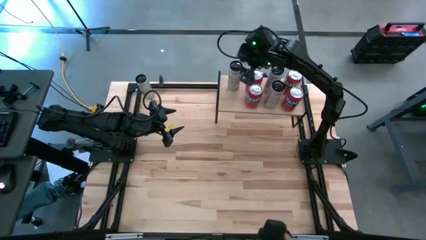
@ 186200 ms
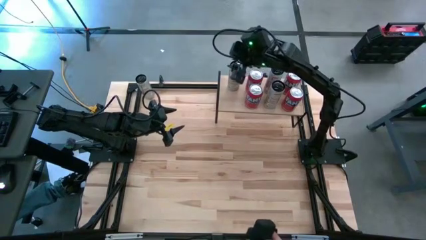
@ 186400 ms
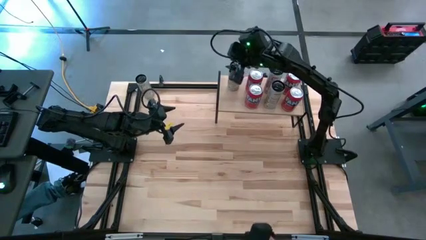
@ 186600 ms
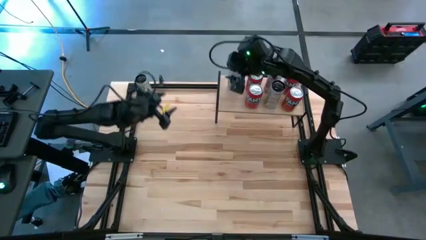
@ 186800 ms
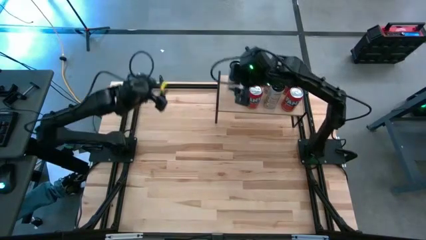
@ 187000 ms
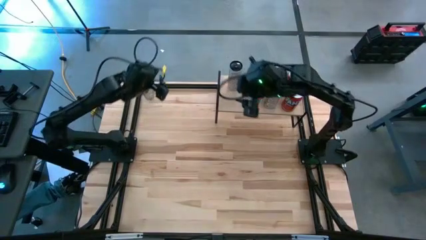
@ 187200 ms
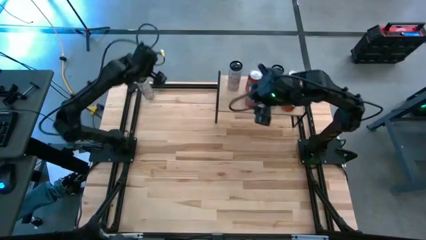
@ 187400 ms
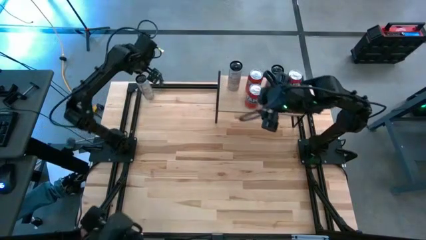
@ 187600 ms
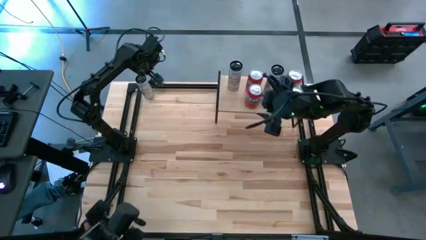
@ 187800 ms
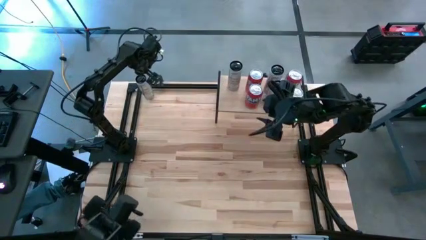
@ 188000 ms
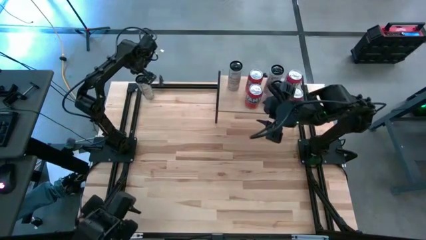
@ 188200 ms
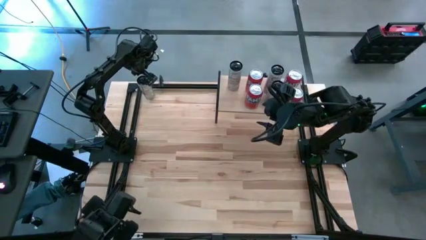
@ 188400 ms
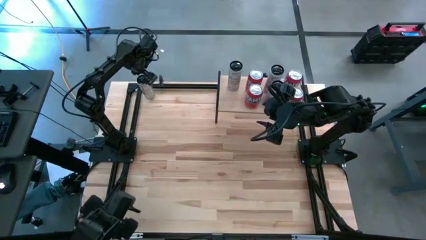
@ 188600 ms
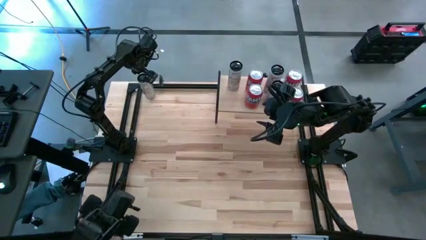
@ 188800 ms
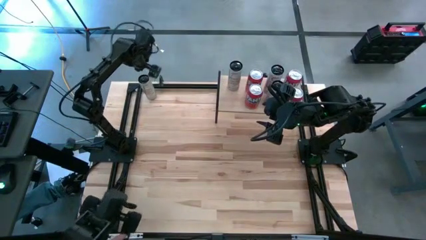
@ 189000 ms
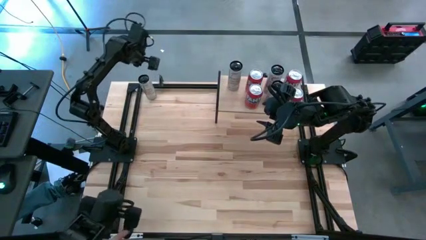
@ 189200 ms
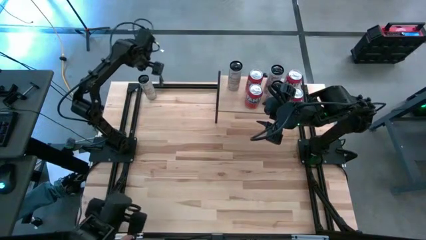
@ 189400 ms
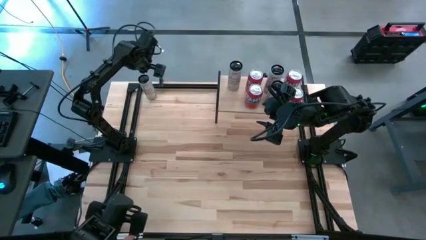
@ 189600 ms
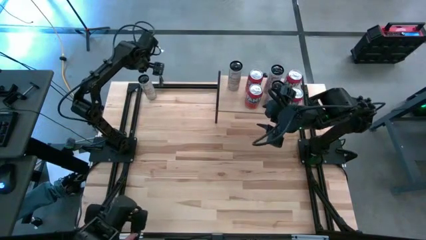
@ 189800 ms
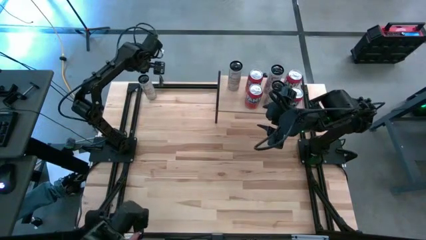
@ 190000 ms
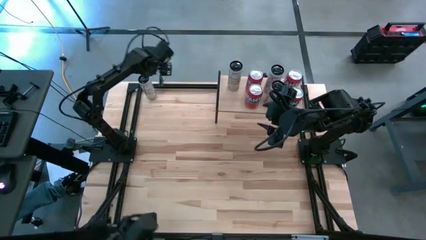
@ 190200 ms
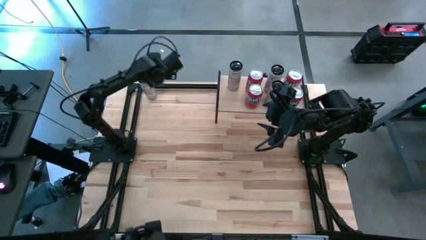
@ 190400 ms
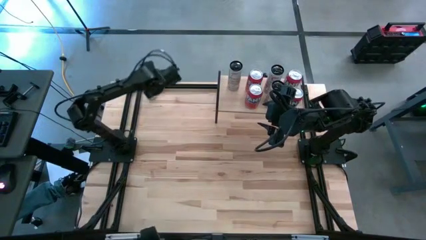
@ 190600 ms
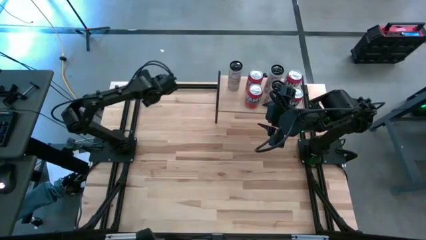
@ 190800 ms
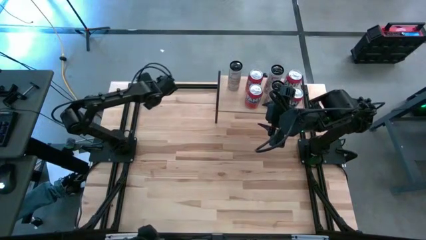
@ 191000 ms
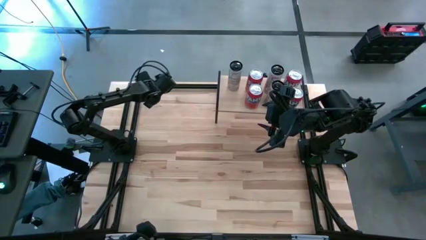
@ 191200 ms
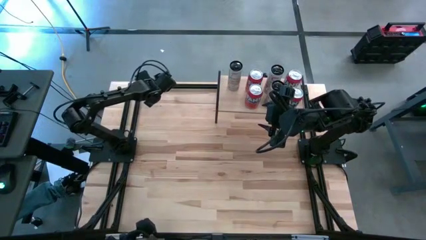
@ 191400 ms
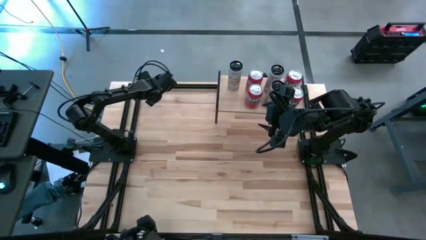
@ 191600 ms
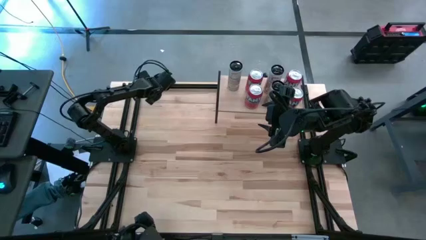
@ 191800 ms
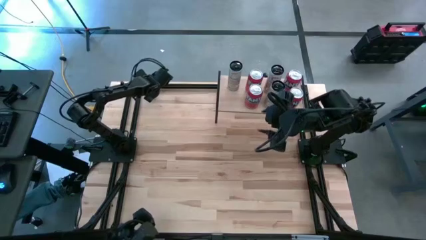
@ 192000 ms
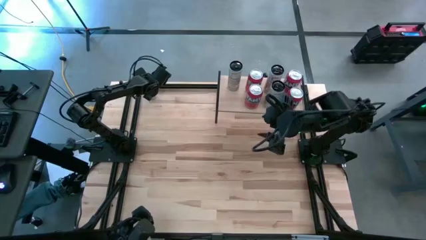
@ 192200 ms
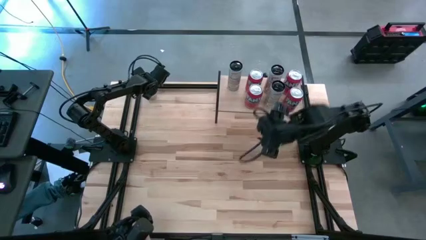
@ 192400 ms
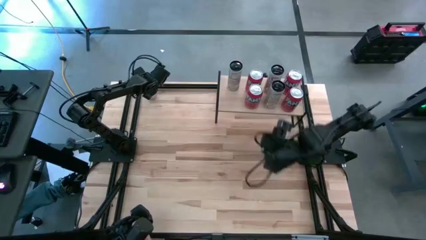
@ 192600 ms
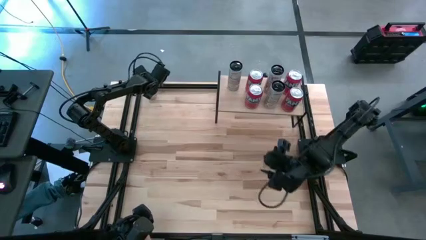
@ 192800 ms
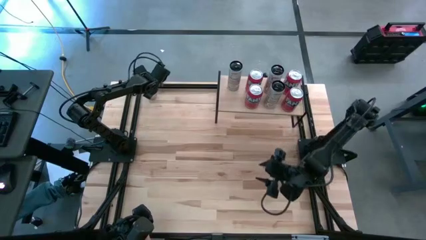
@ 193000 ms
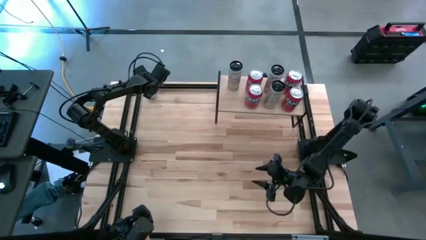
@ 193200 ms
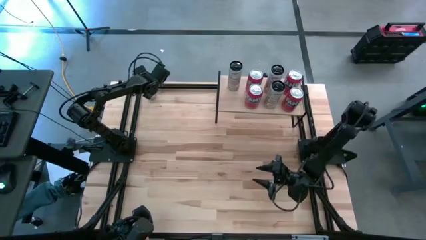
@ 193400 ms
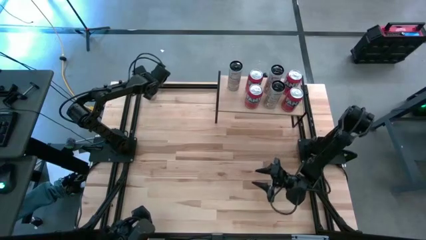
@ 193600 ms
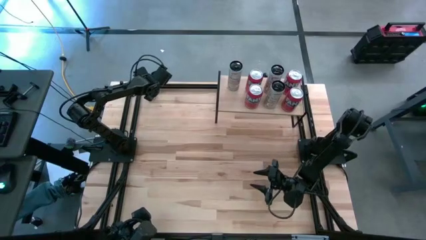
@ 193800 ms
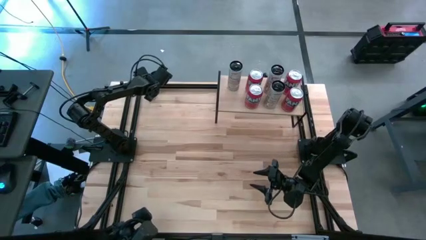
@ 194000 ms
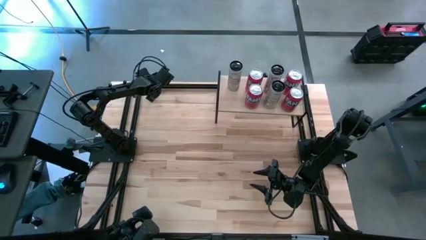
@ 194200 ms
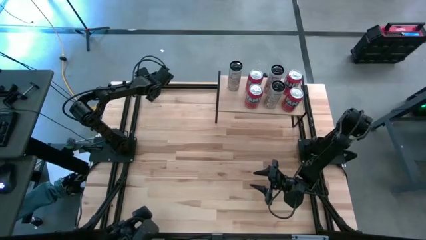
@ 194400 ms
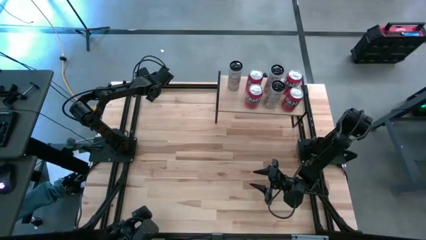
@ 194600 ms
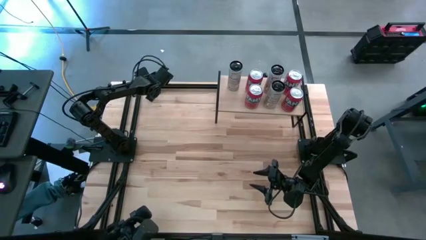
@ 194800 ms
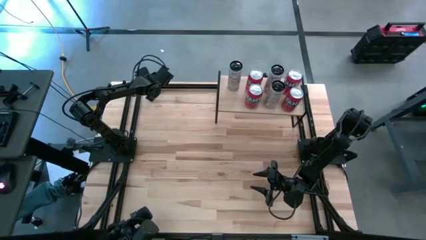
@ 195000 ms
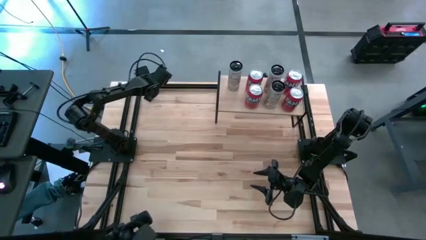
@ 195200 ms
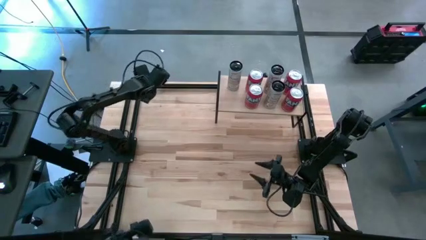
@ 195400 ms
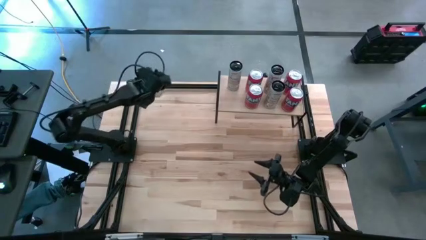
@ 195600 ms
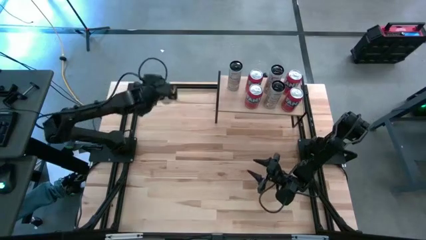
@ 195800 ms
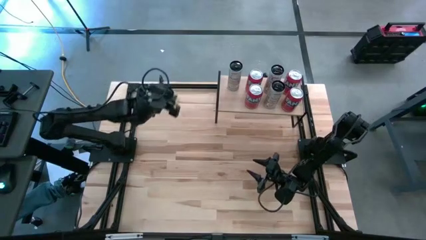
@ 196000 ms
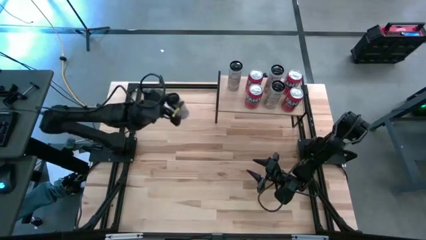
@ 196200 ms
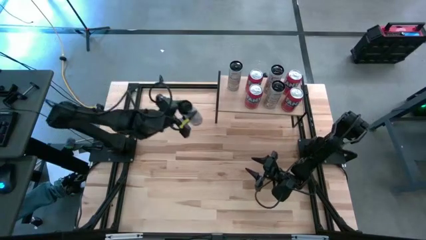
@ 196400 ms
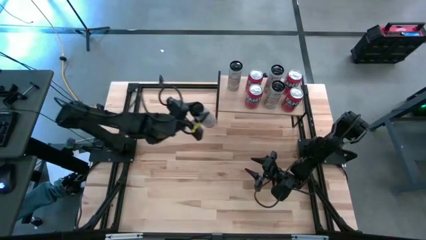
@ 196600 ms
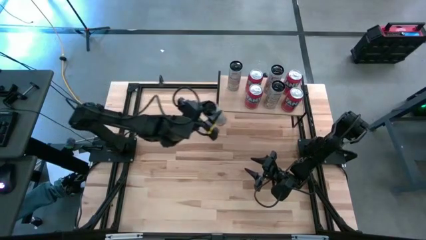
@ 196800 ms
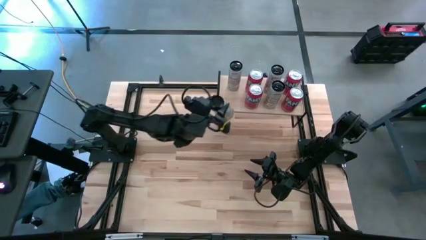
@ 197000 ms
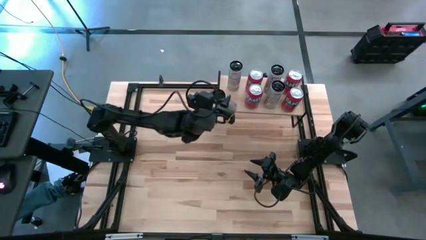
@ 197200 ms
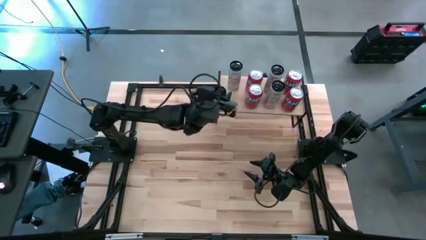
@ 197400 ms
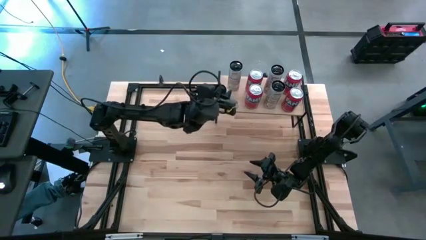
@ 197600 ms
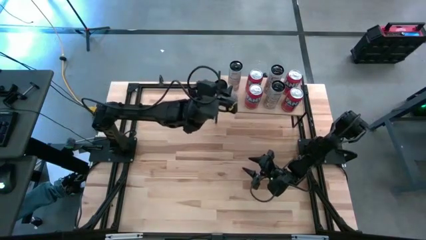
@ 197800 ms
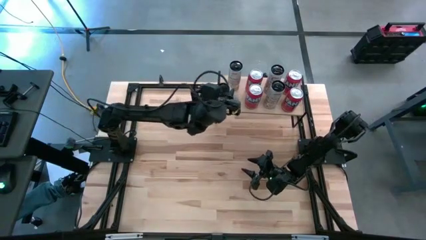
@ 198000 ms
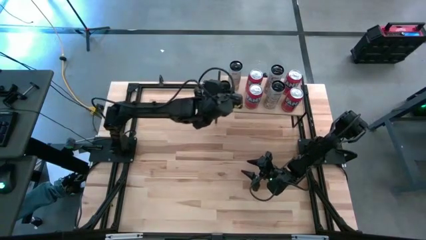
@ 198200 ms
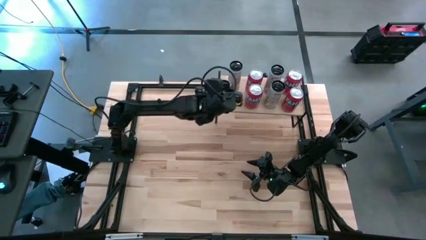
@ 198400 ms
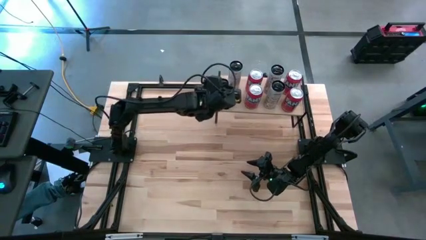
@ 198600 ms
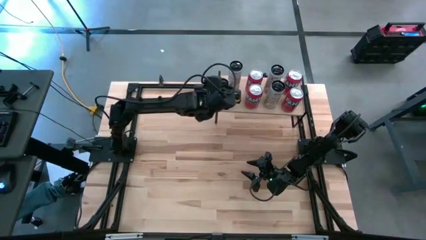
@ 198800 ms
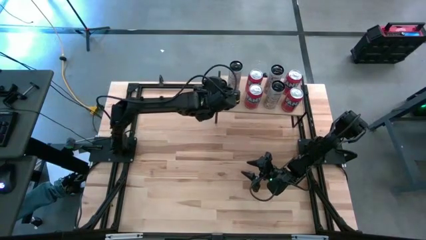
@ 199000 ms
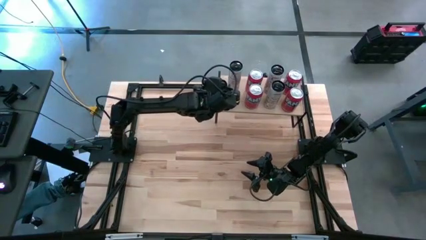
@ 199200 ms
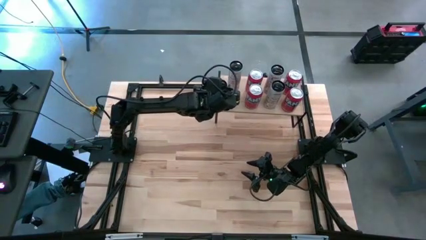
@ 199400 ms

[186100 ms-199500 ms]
Task: Place canned beverage on shelf
Put the white soda can on the shelf aligned with the other white soda can

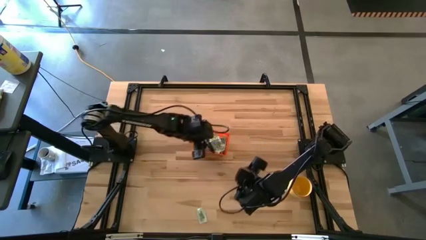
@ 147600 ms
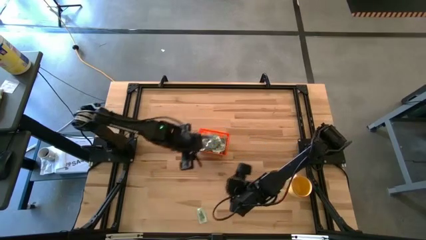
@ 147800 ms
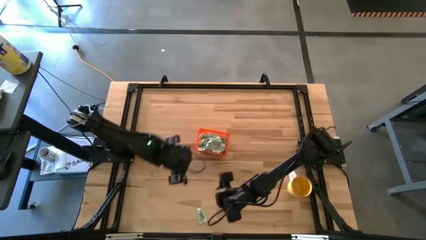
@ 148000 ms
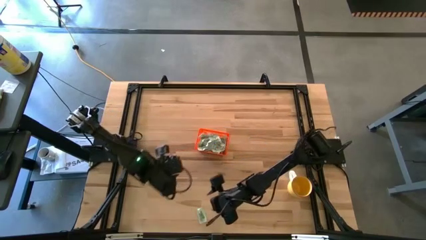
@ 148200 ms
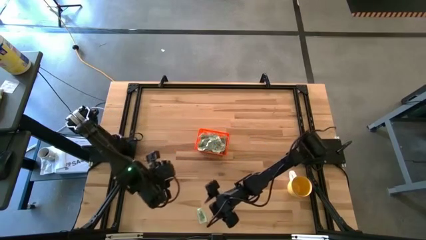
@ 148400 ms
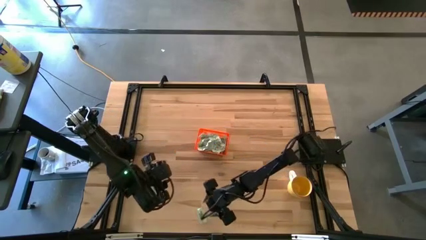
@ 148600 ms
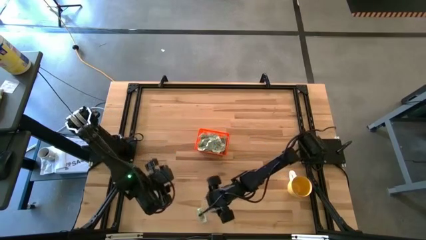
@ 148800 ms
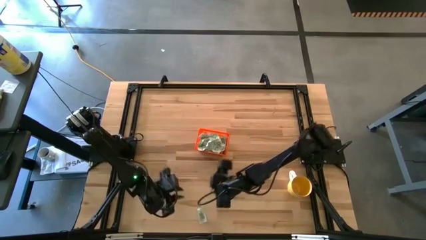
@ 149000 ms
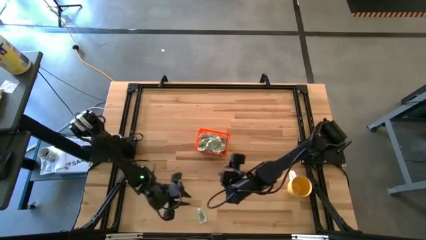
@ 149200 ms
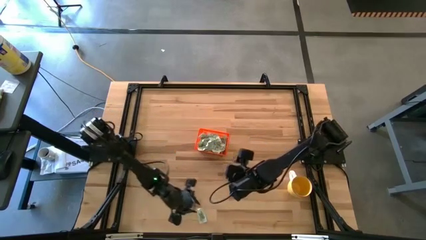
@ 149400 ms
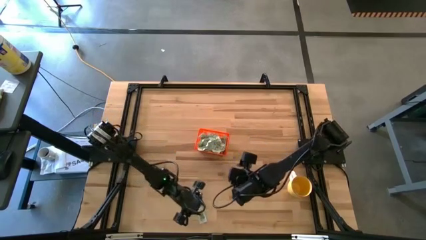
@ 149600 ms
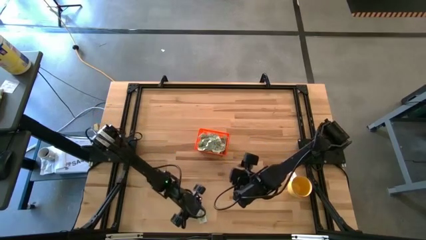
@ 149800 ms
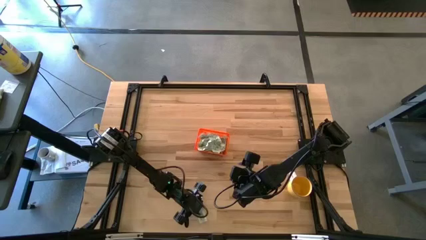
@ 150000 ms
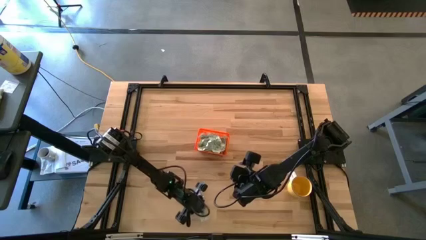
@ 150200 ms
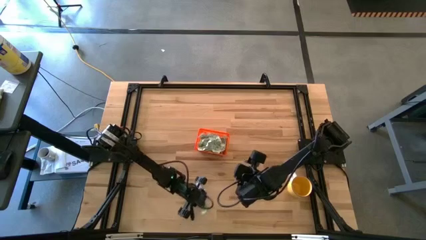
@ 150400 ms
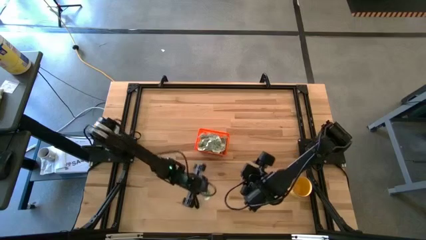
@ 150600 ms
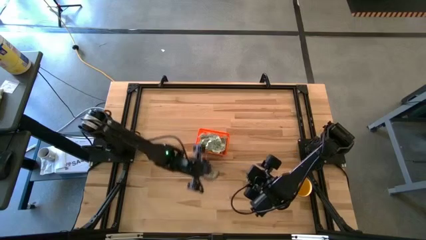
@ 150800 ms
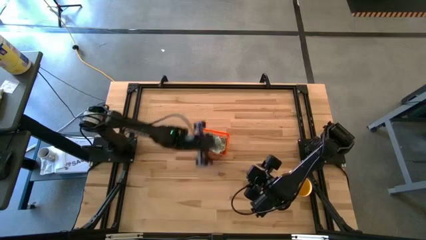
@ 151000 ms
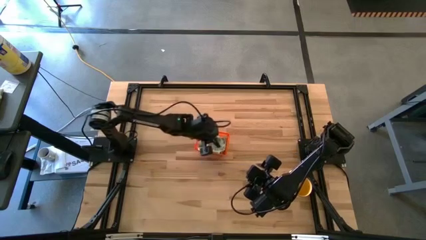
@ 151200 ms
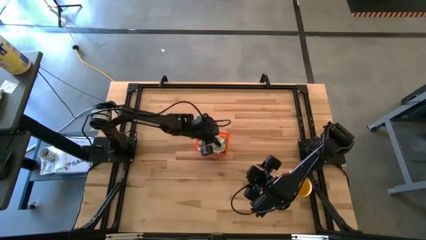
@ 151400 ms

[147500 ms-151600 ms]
Task: Pick and place Stevia / Truvia into bins
Put the light green stevia packet into the orange bin
